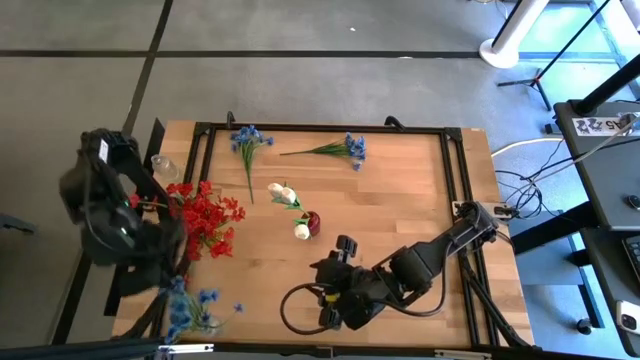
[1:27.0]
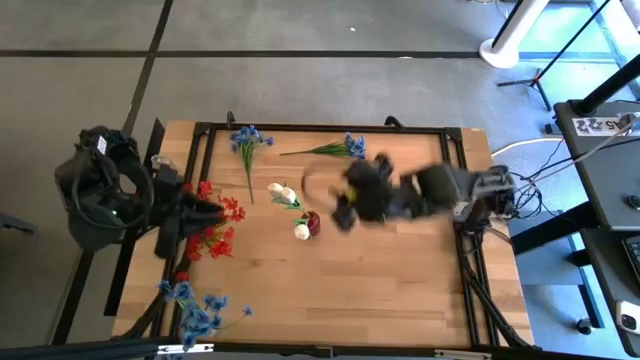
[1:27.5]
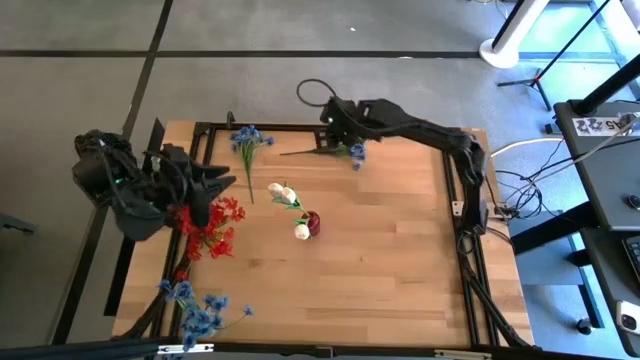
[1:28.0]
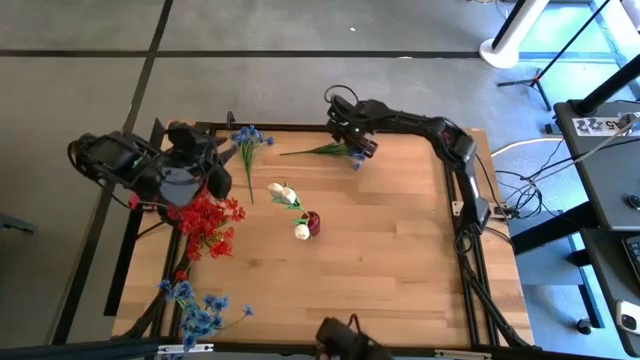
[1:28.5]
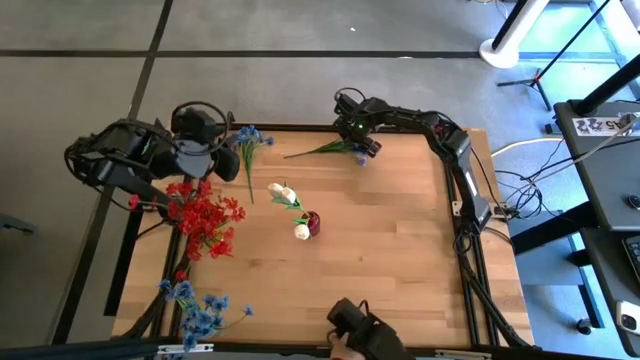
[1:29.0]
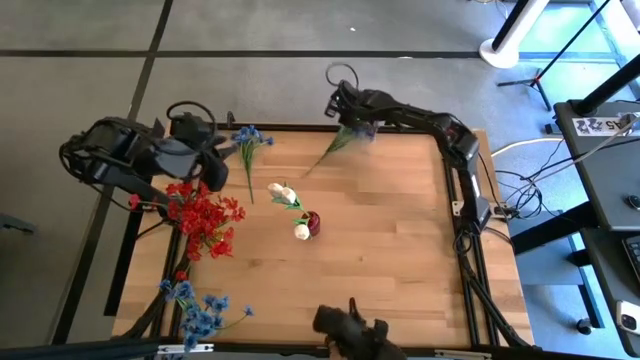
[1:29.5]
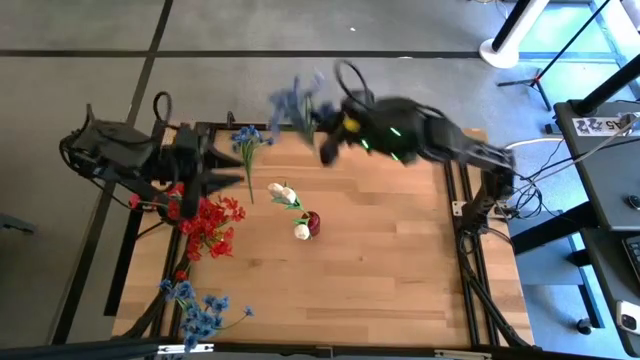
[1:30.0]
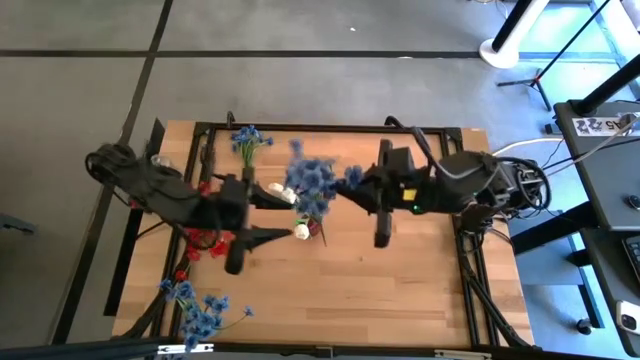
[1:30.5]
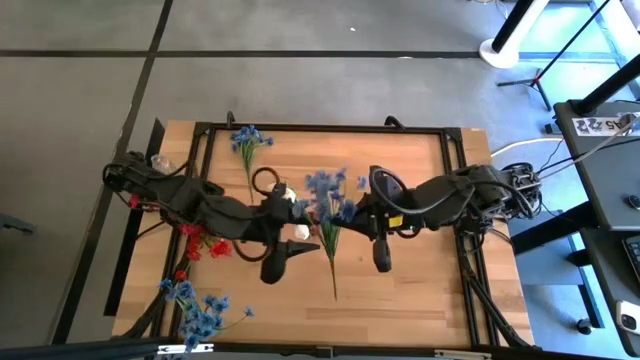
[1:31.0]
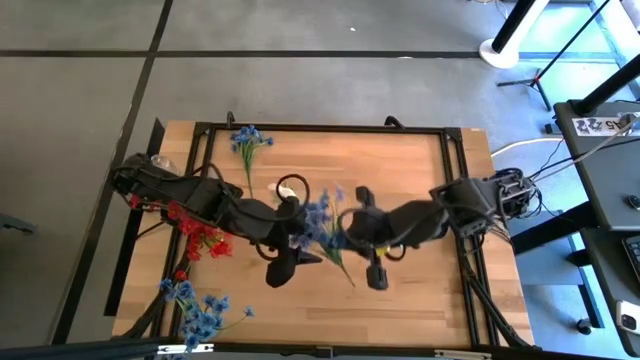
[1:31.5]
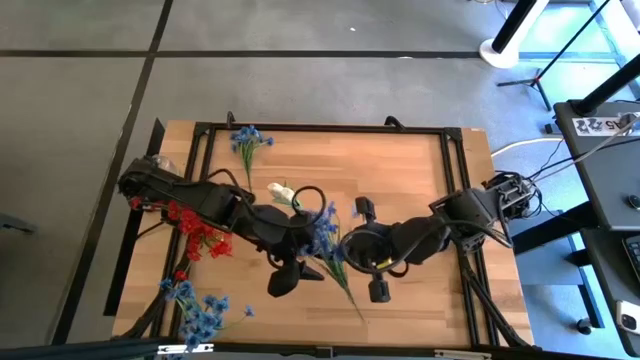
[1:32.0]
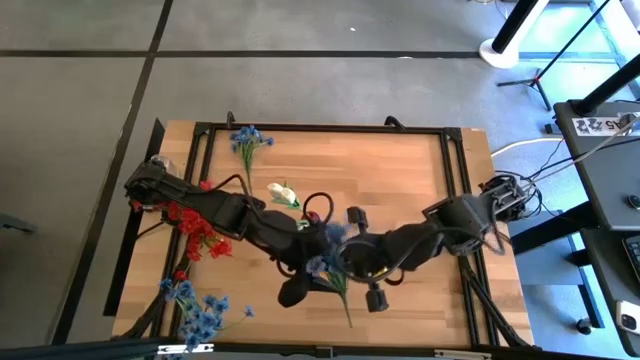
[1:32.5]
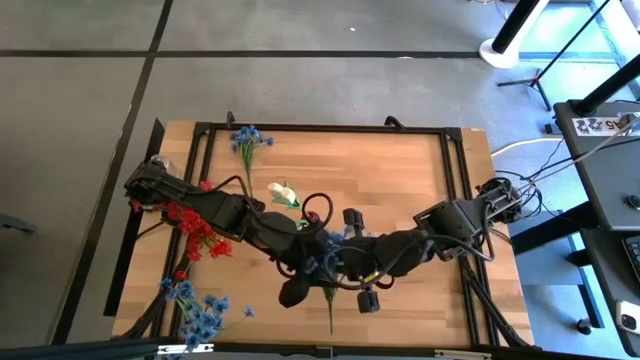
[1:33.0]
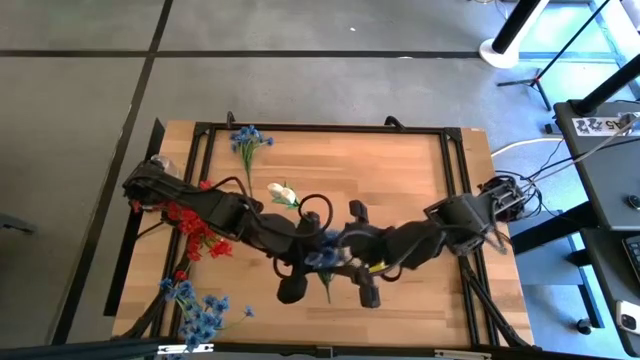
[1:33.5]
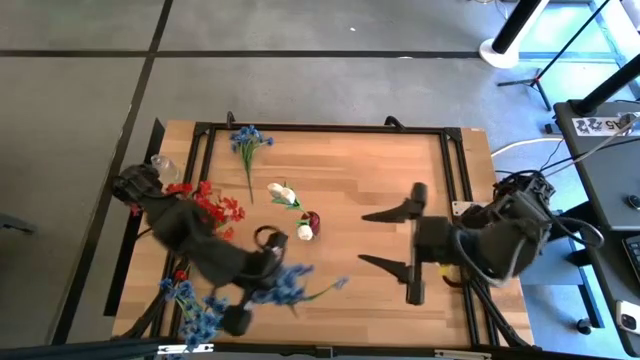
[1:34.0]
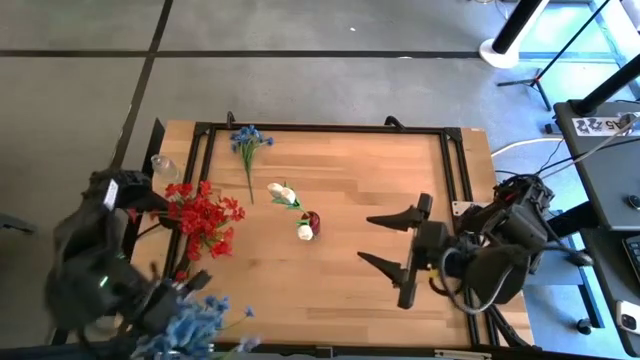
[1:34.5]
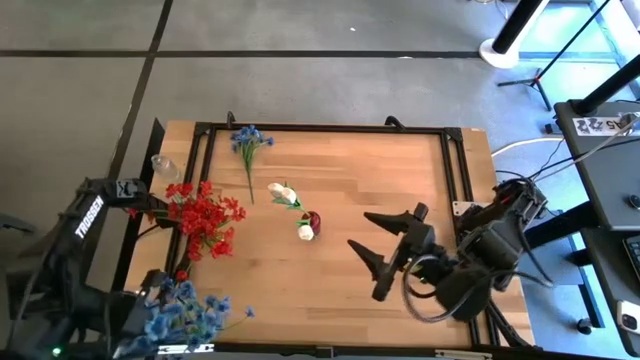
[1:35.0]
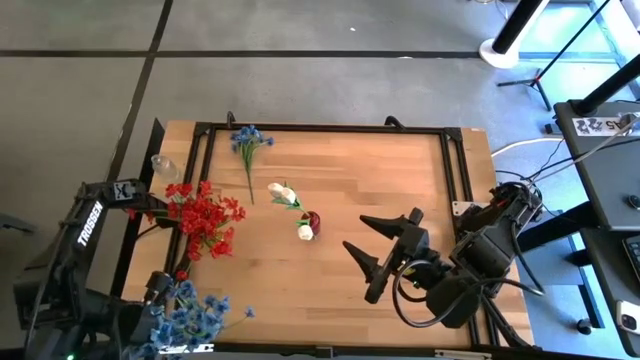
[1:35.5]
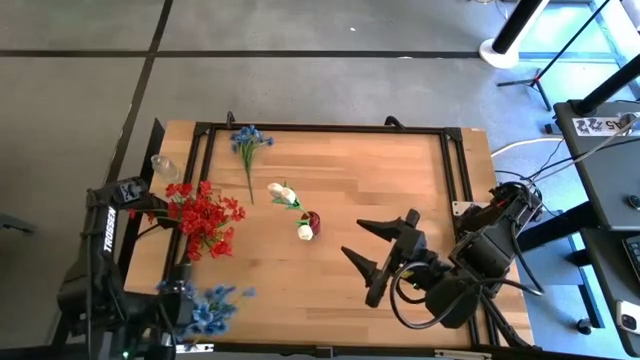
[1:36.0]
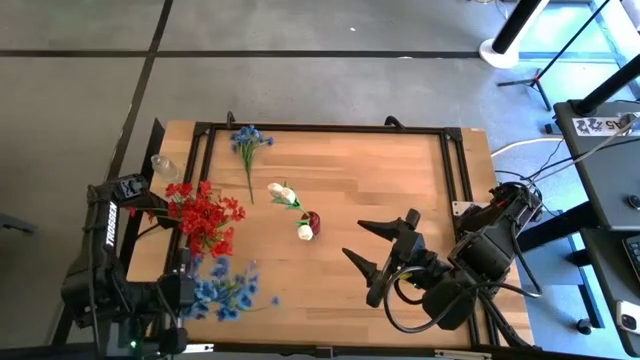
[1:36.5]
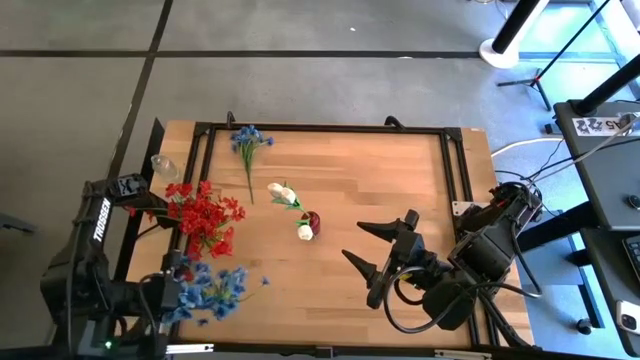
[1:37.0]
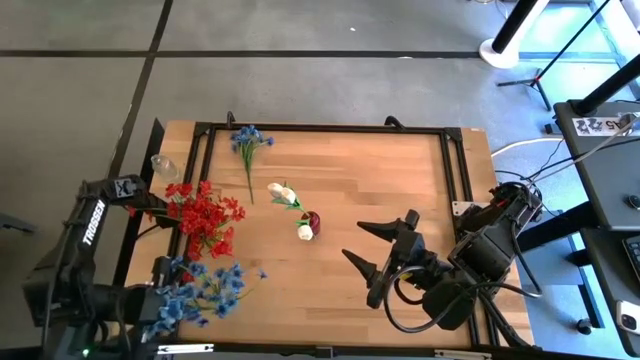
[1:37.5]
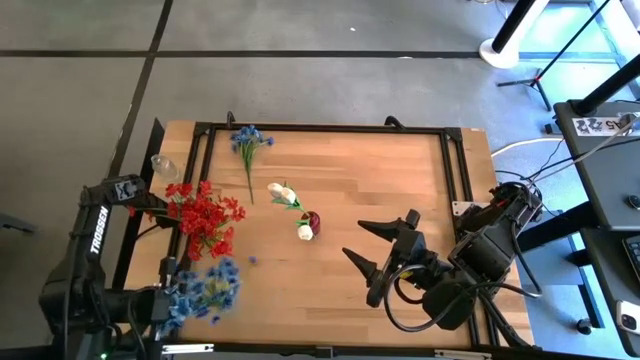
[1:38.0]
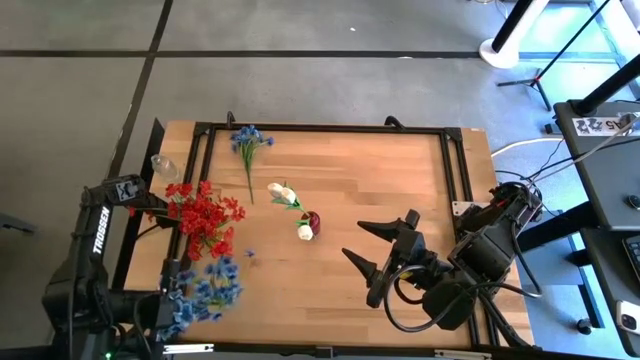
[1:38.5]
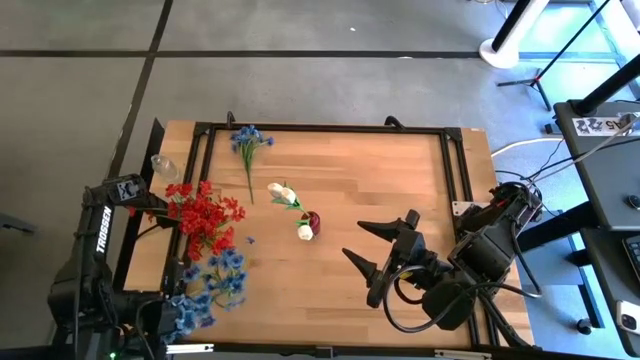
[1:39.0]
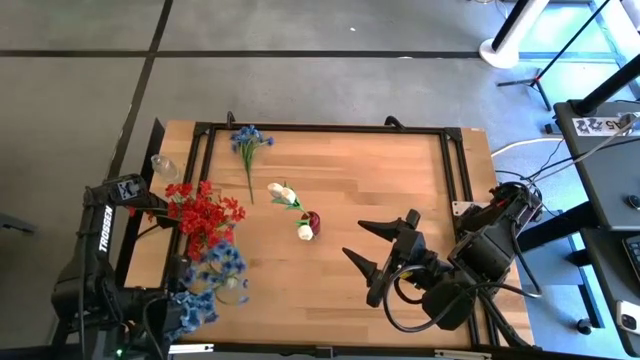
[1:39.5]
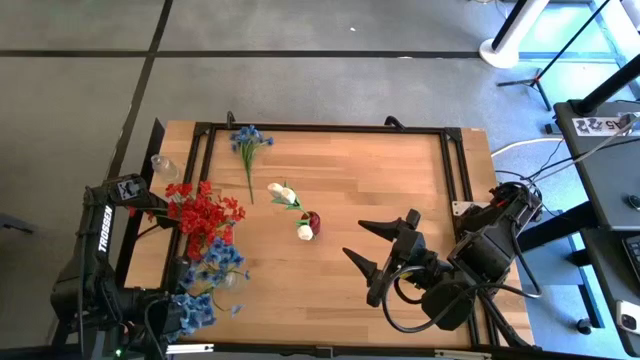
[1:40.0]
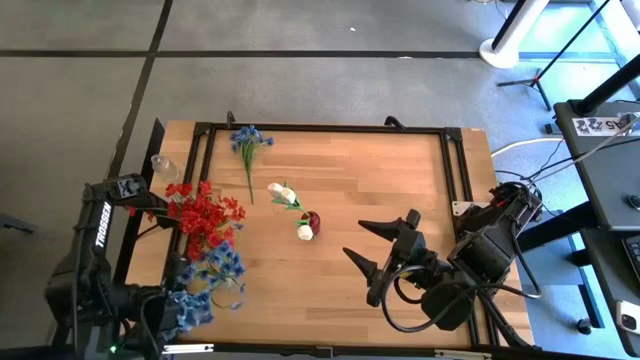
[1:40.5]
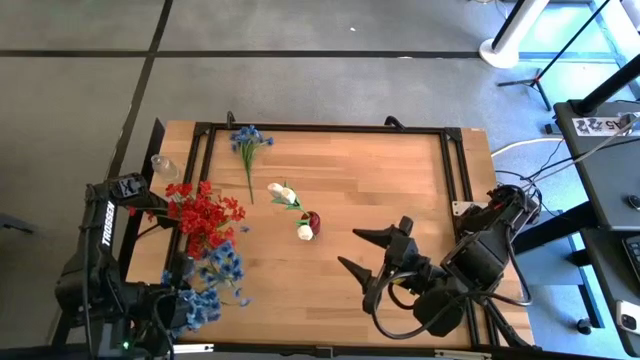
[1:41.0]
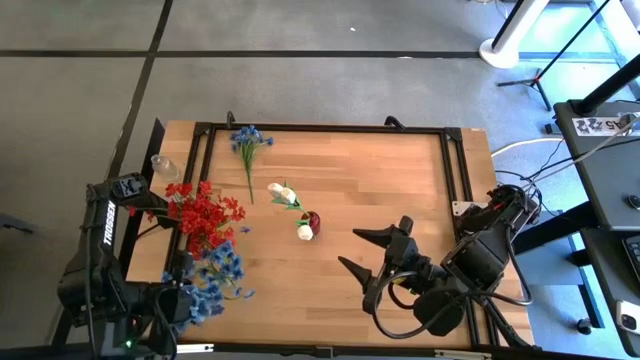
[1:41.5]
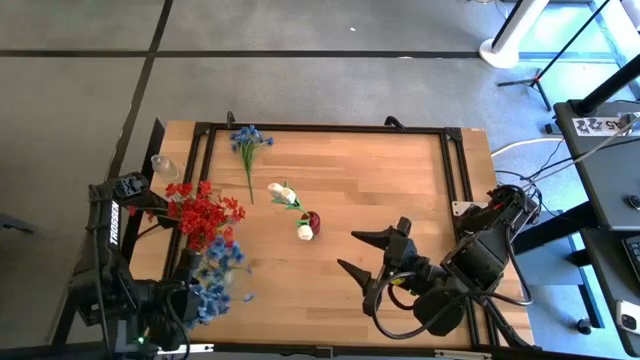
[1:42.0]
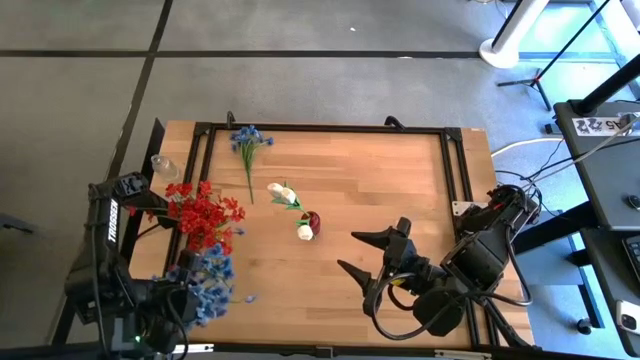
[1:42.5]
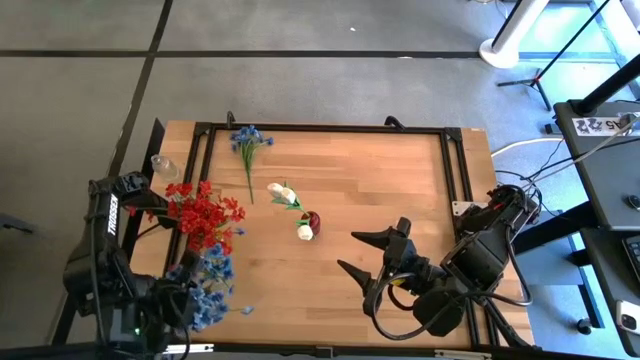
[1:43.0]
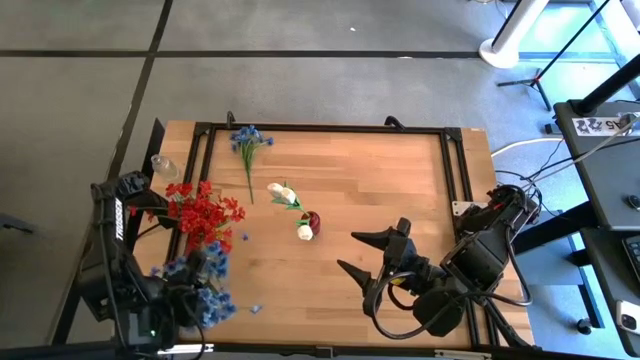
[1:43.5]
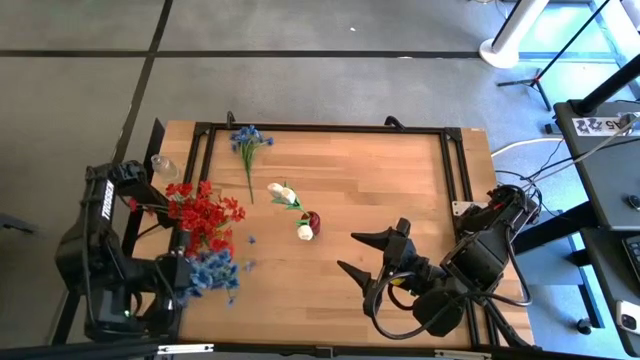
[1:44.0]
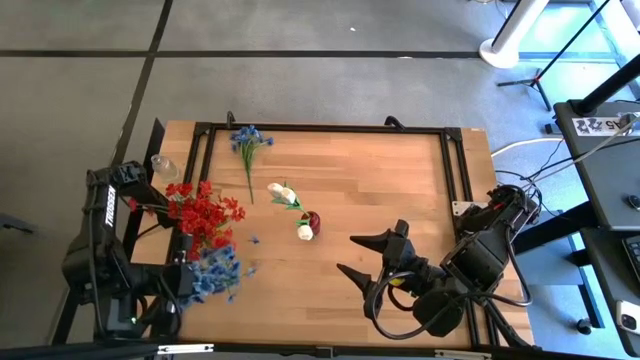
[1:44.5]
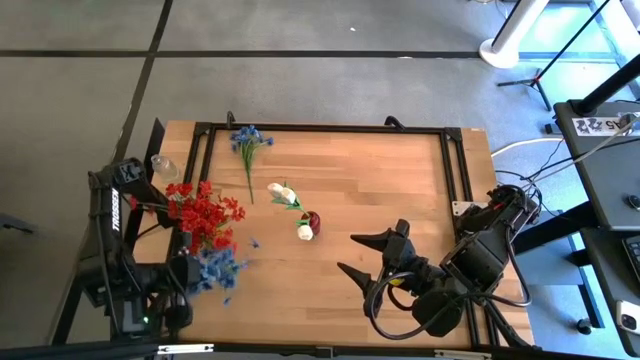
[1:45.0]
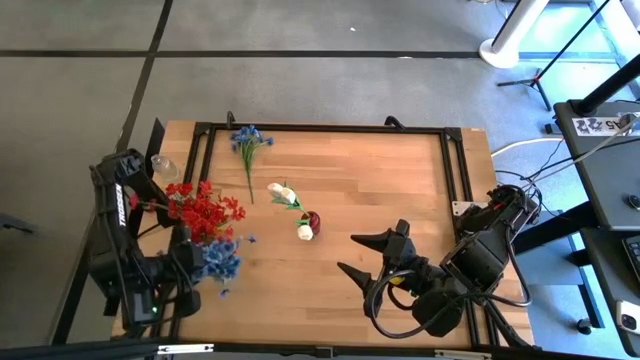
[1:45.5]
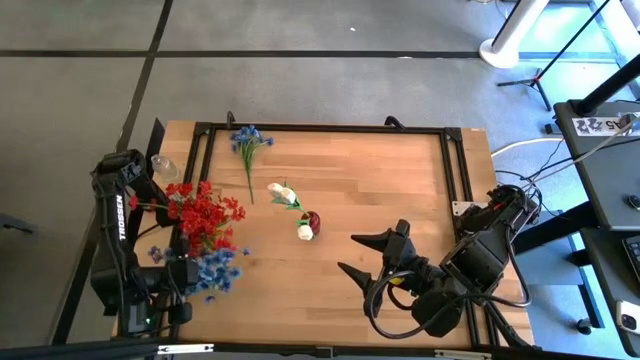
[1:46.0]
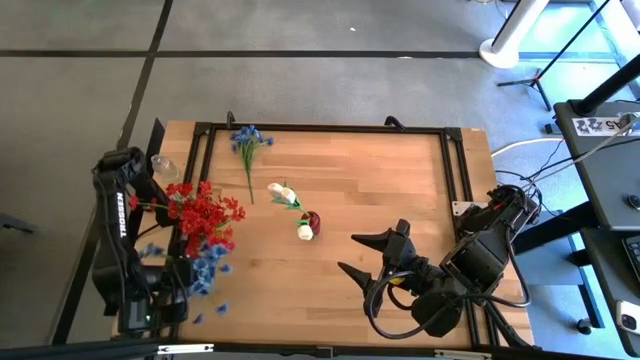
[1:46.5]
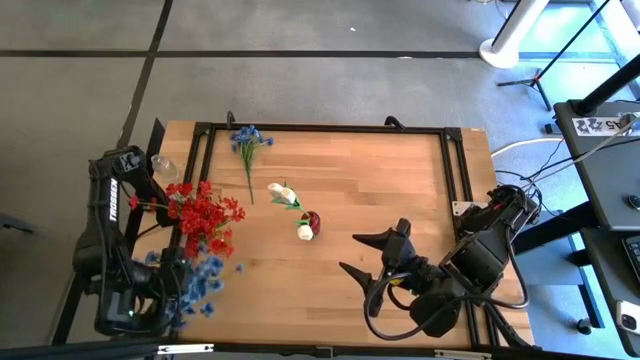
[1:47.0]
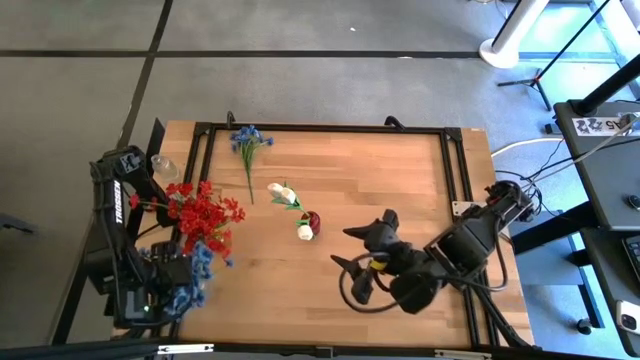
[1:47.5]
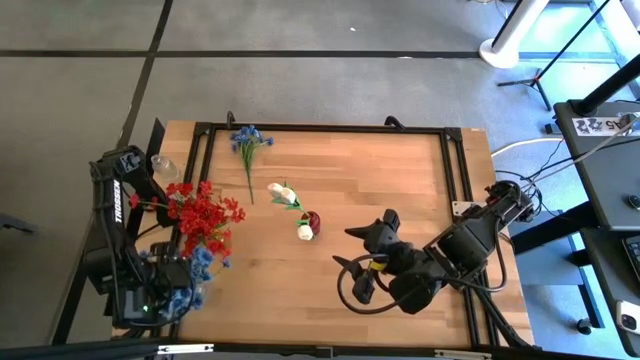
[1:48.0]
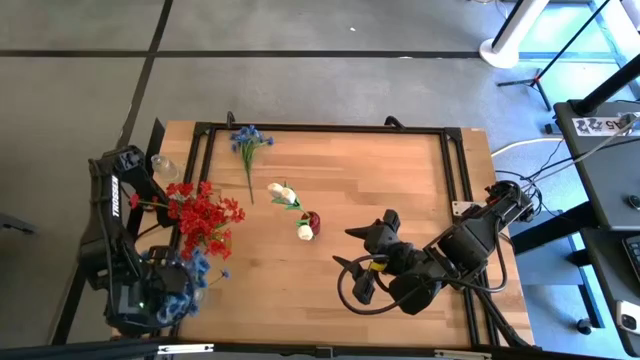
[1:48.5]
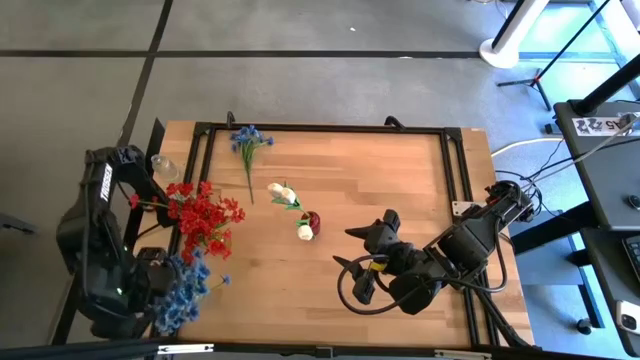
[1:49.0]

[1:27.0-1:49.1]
Task: Sort flowers into vase by color
Put the right blue flowers into the transparent vase
